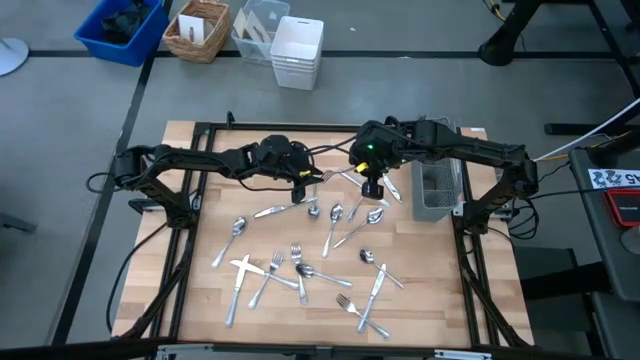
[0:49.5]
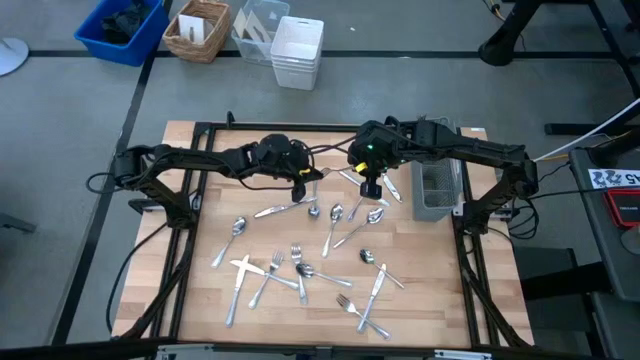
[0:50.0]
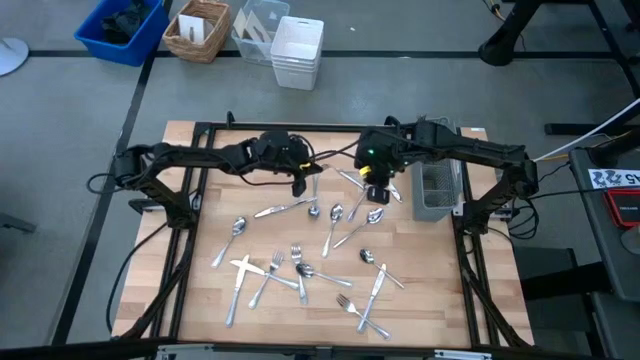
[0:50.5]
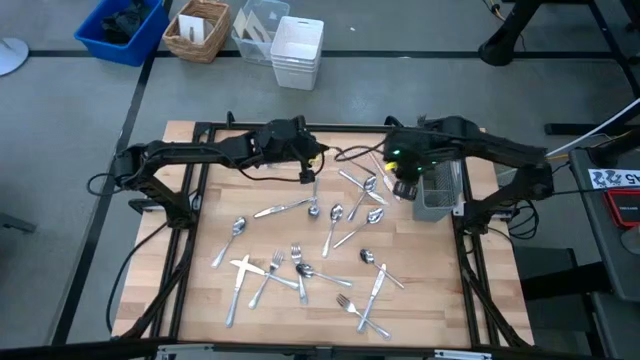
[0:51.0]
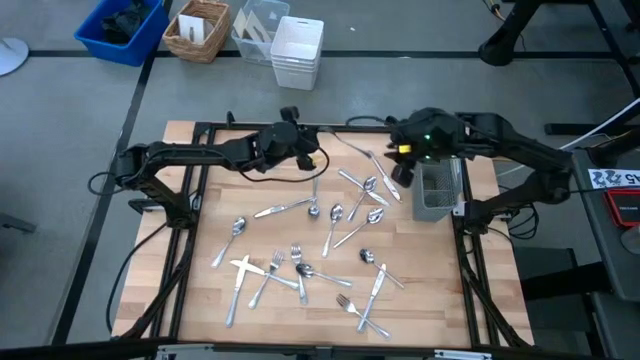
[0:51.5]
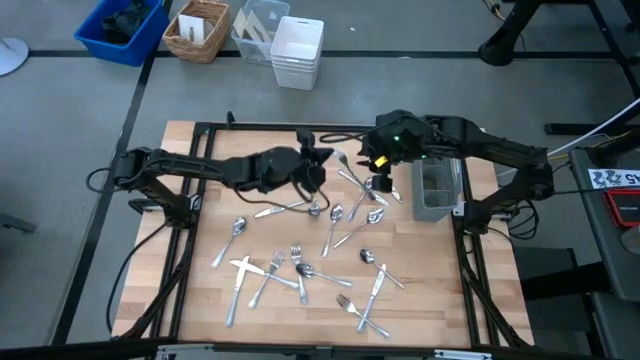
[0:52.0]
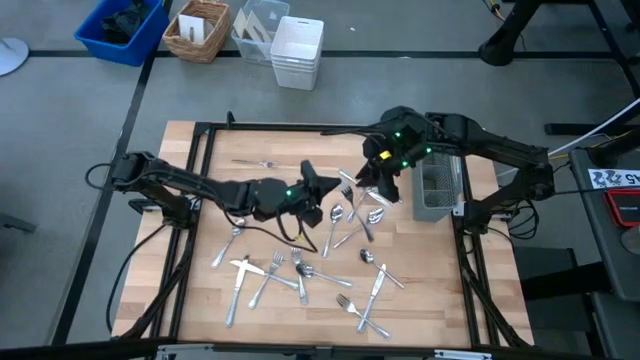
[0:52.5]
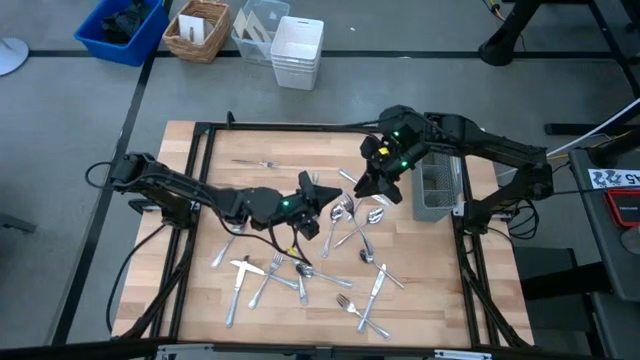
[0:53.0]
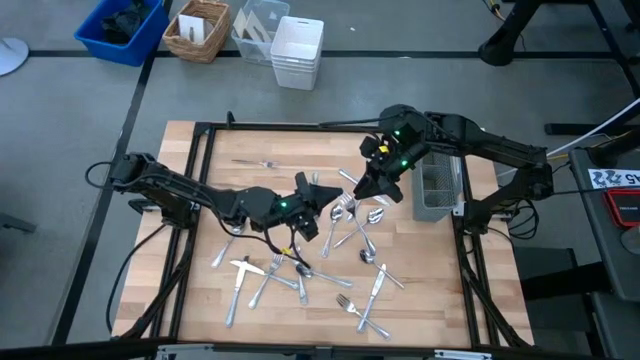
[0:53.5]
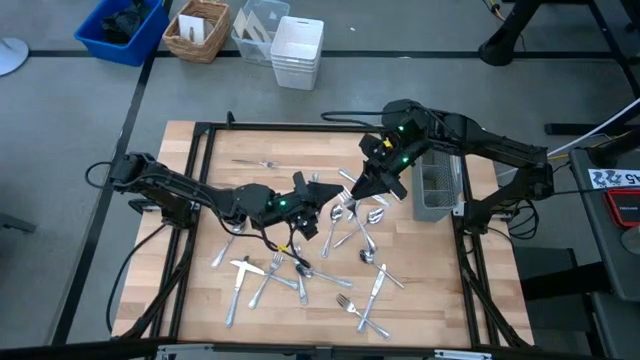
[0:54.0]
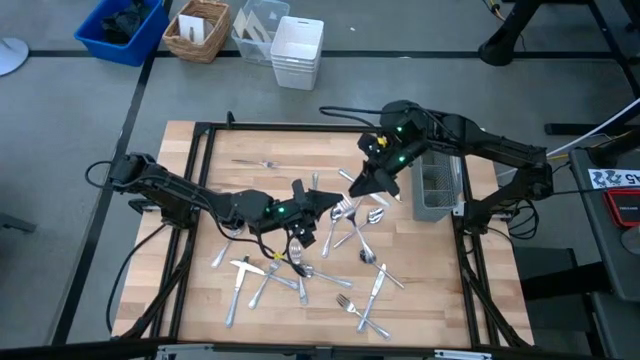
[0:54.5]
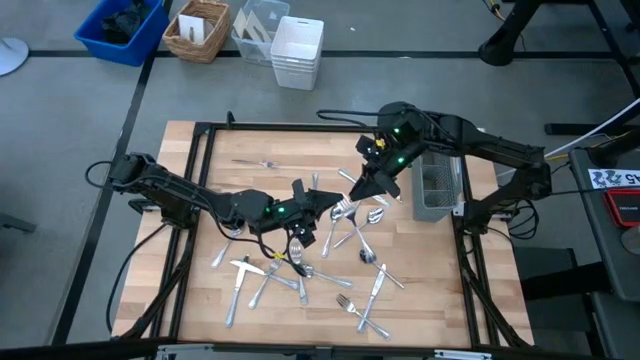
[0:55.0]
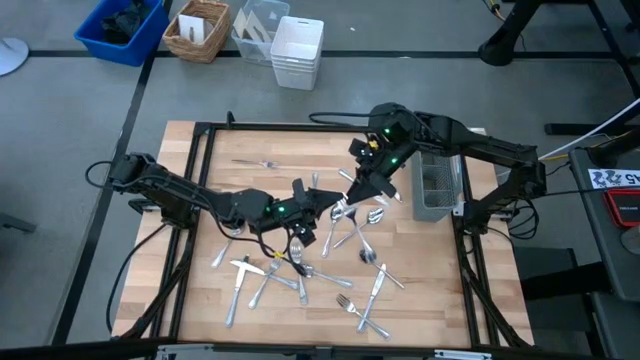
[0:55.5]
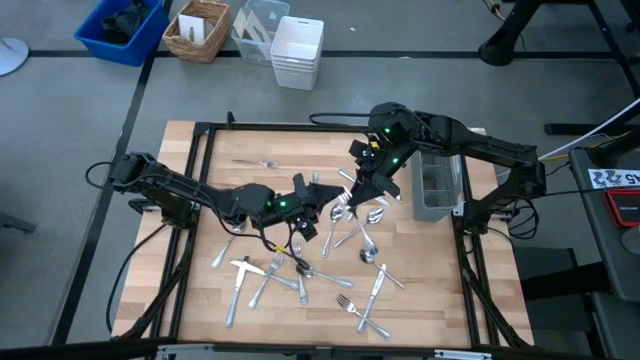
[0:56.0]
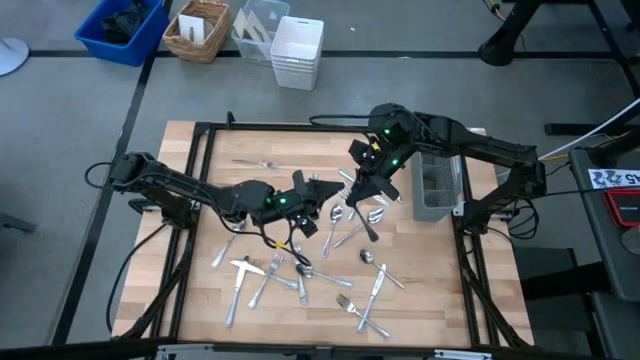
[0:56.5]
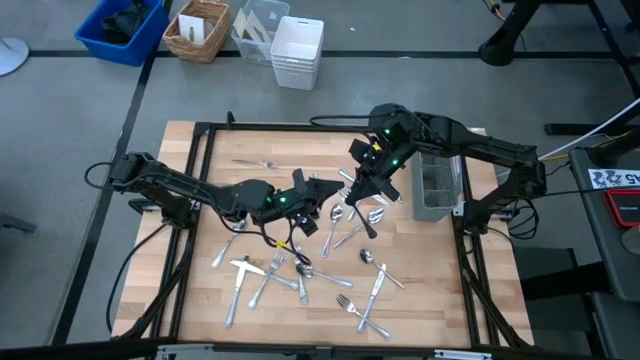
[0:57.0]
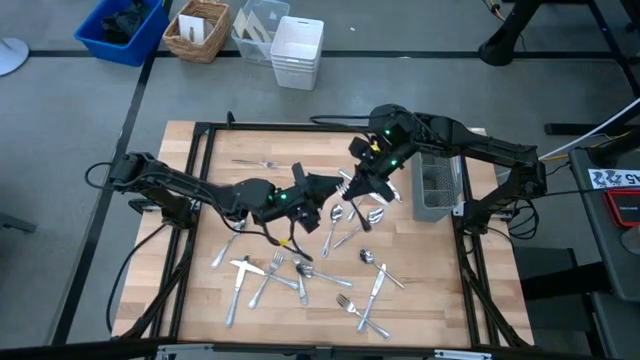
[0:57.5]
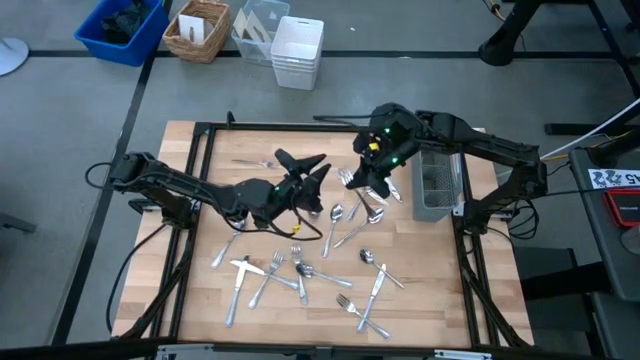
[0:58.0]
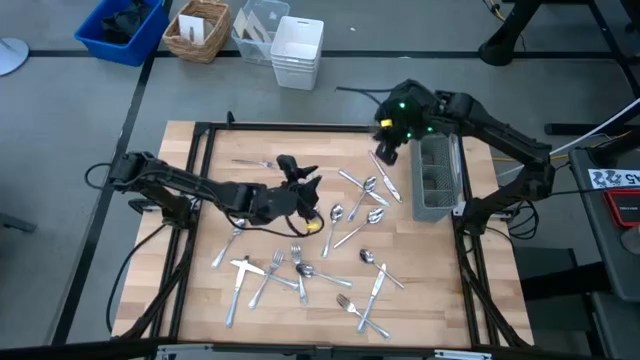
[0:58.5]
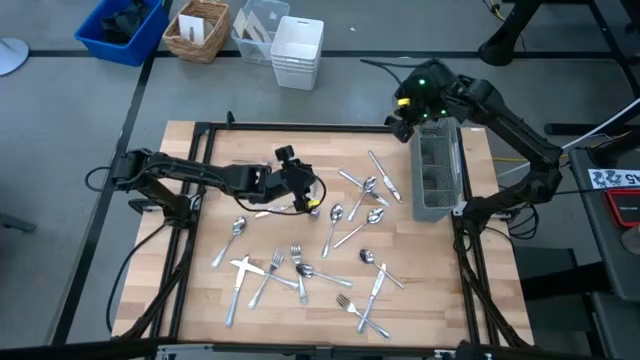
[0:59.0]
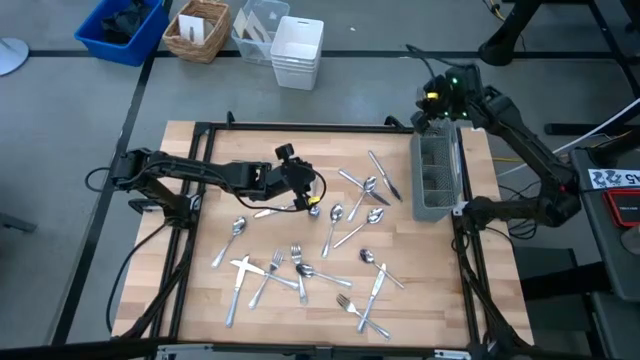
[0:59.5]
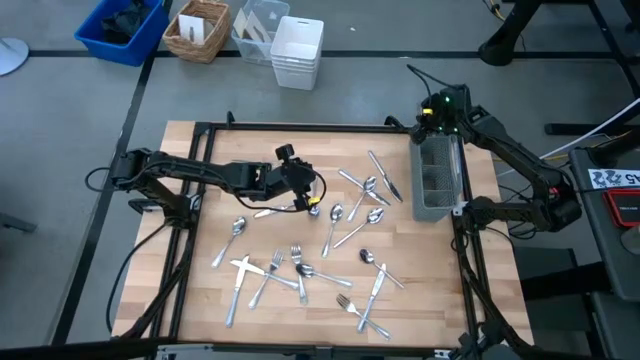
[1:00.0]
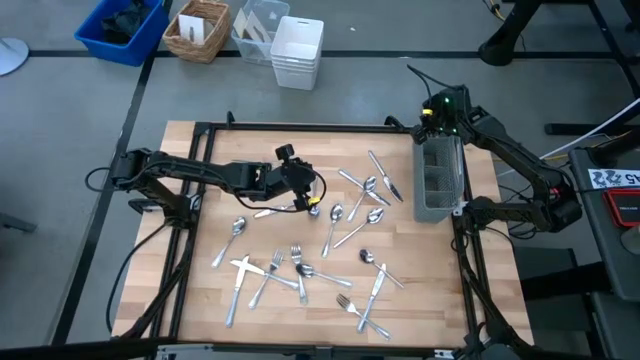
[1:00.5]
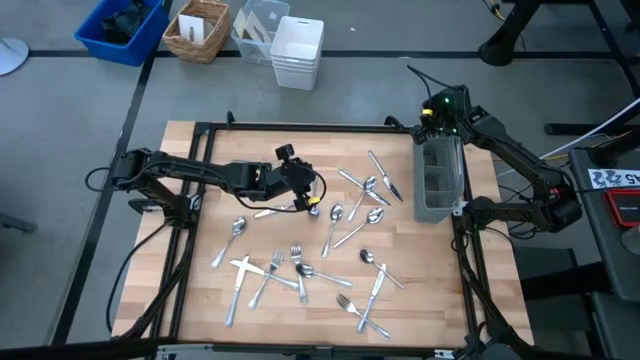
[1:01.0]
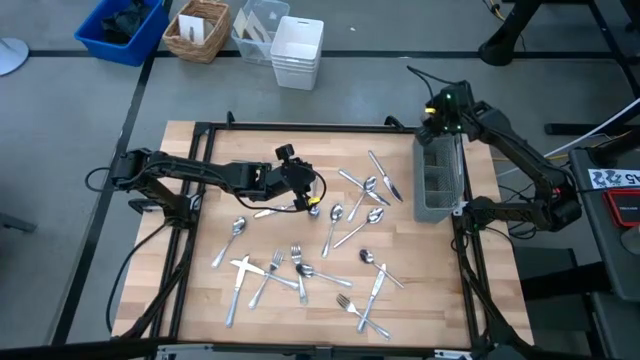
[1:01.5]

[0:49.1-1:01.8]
Task: Sort silverware
Put the fork into the left section of the utensil holder

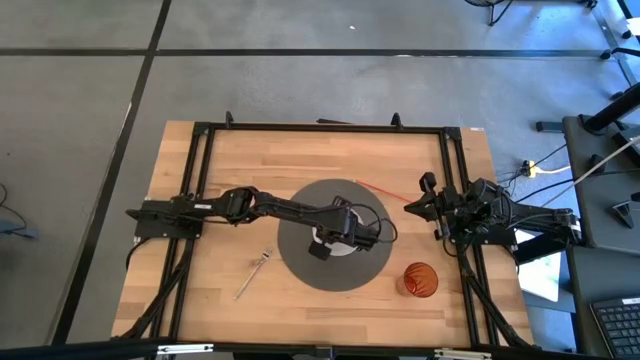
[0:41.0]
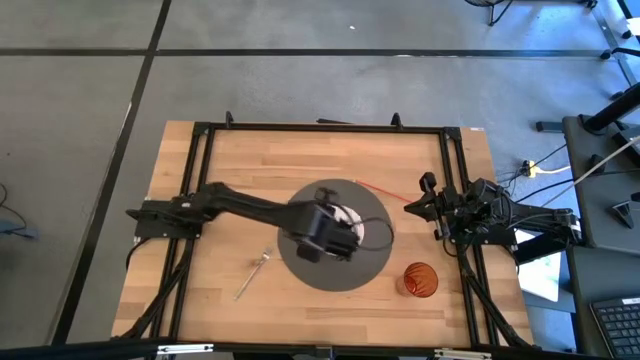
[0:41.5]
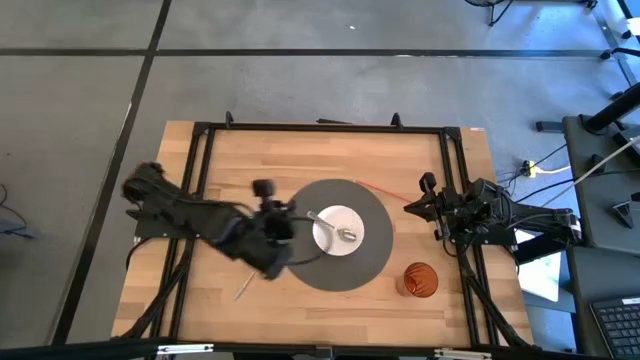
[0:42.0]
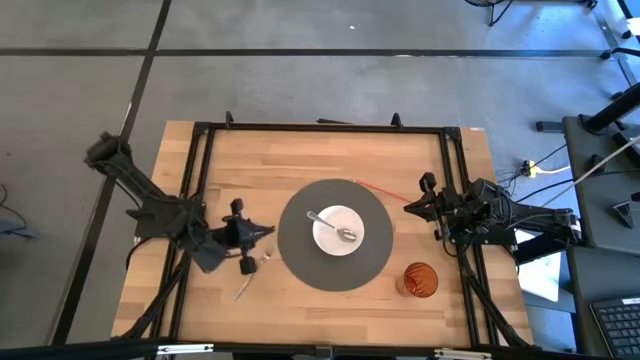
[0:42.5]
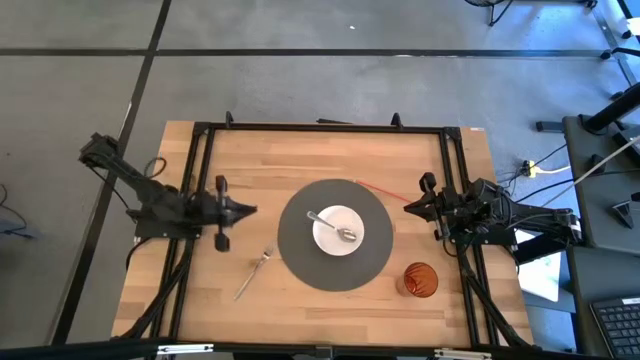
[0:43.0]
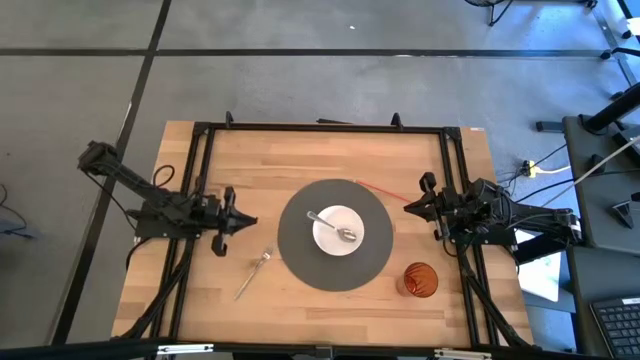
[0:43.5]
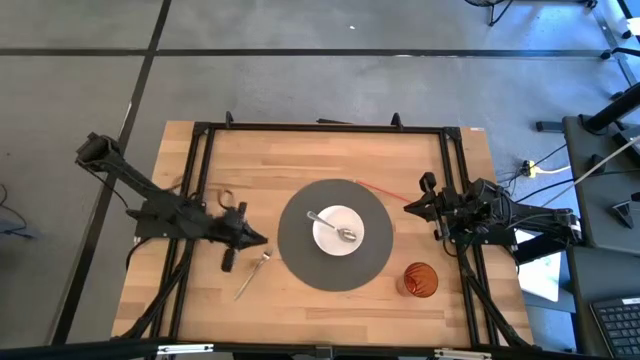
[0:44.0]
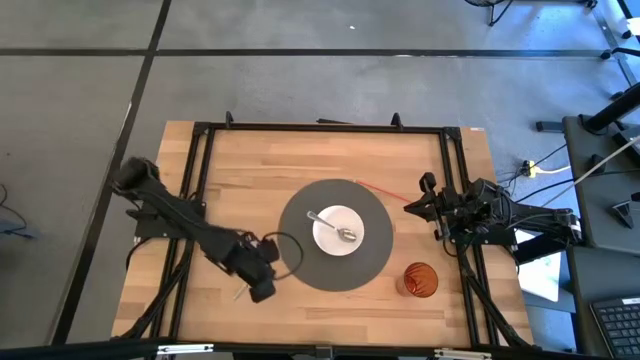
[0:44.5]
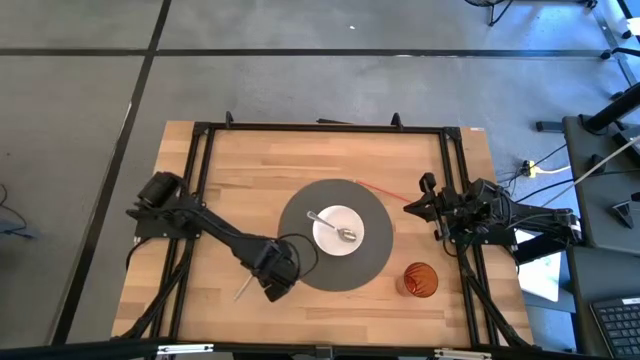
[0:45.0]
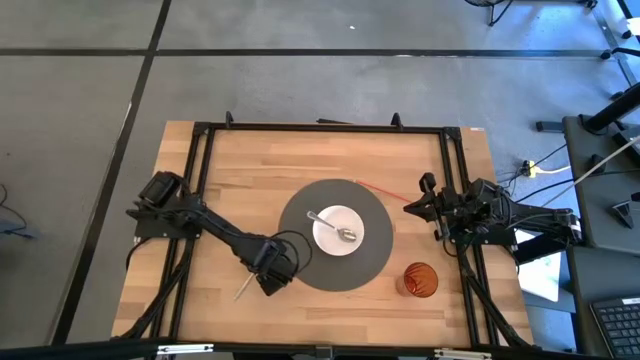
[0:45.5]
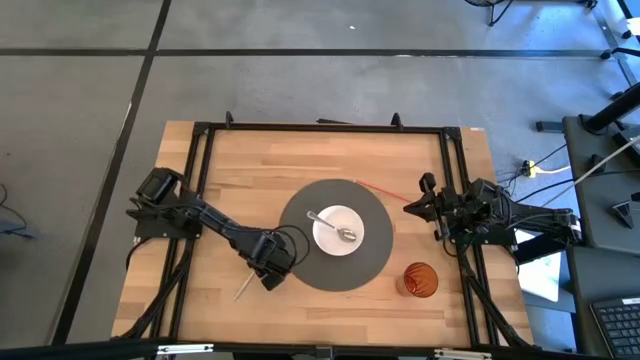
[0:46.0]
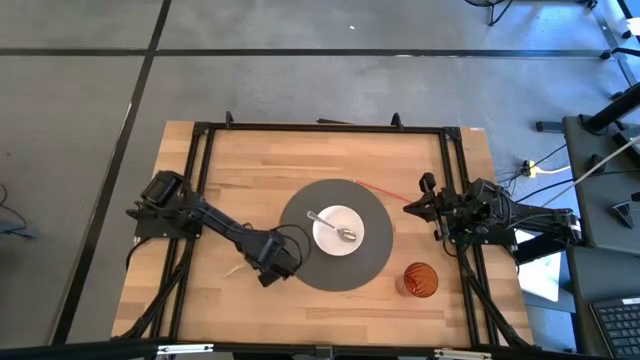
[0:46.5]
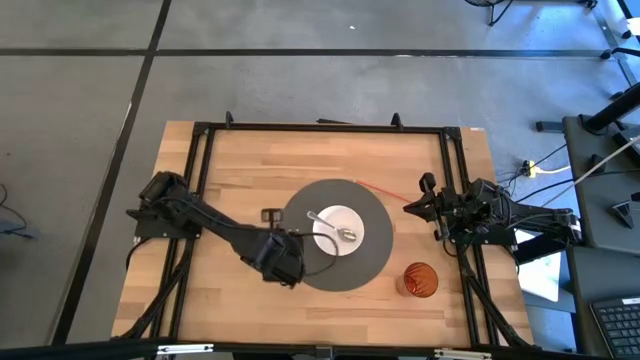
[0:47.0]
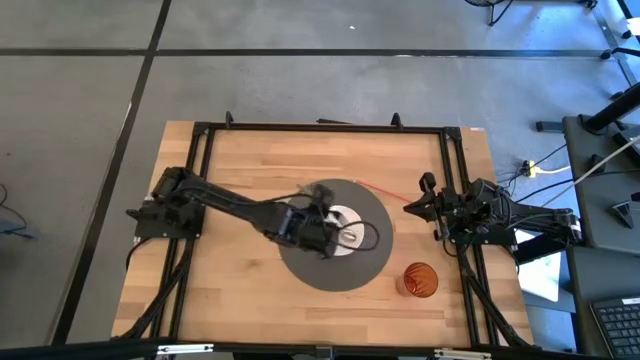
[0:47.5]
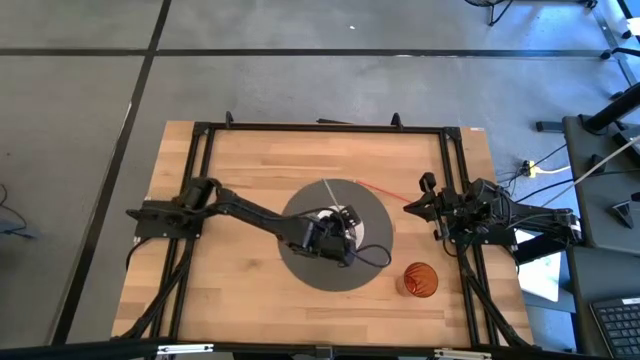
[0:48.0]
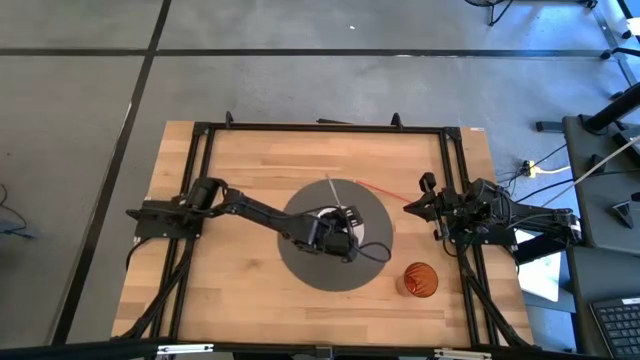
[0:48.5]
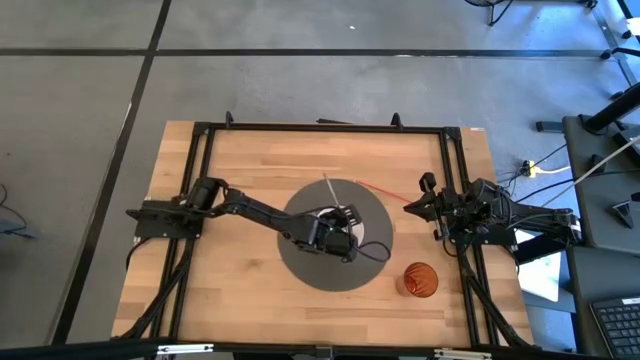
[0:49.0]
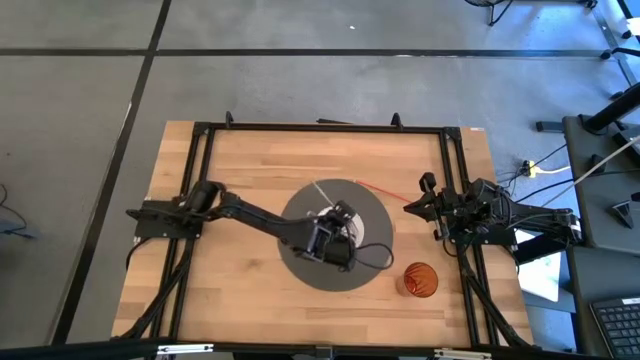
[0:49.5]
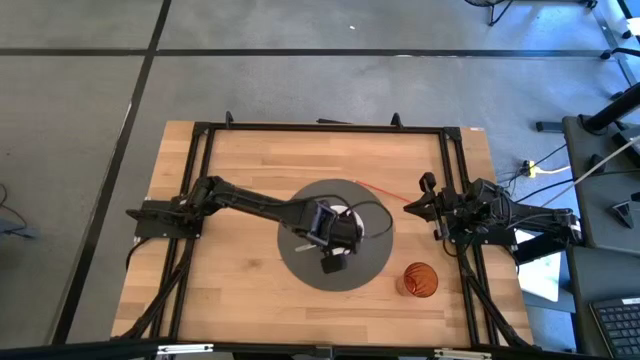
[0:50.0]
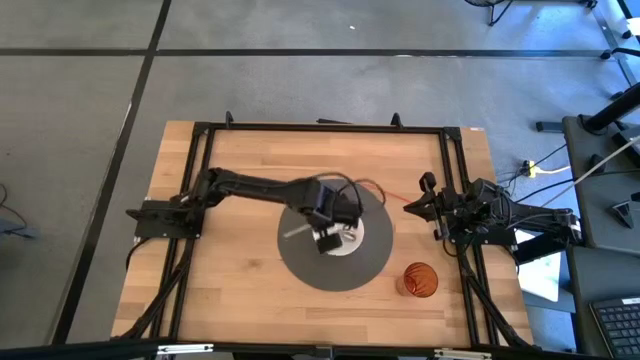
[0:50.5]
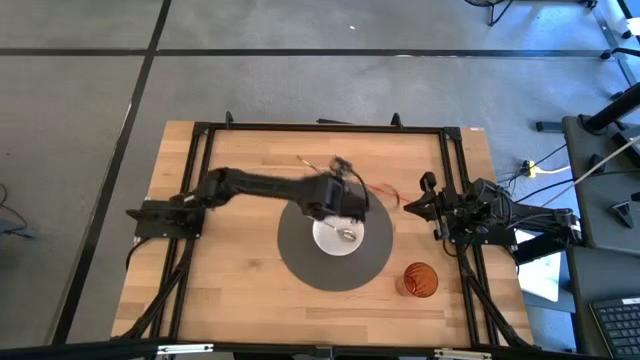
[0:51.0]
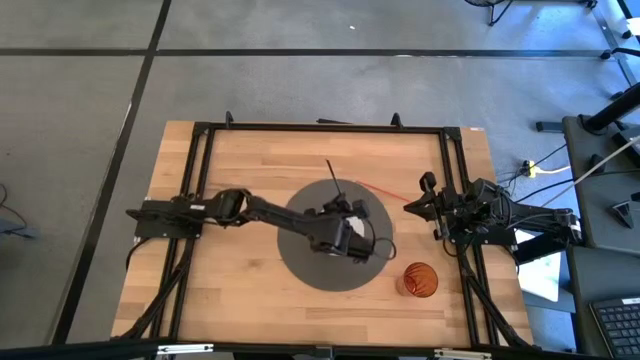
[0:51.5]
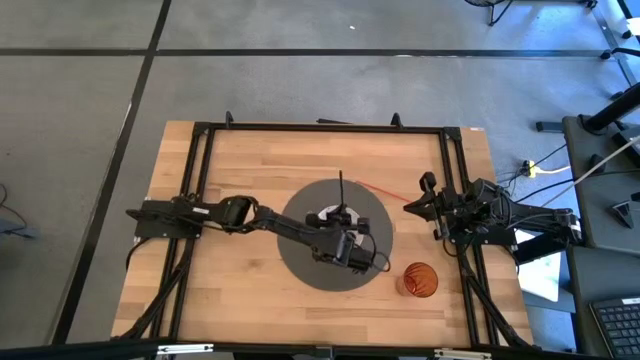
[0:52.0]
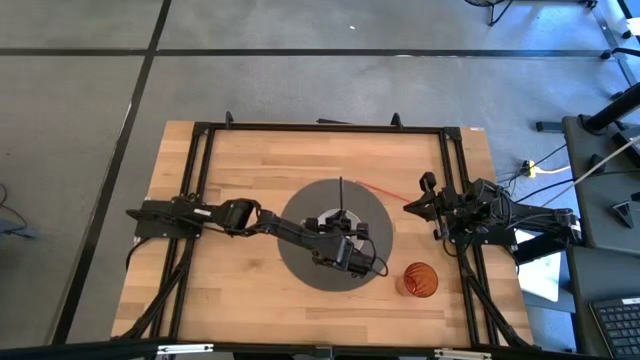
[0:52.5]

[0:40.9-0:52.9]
Task: Pick & Place Utensil
Put the silver fork into the white bowl
